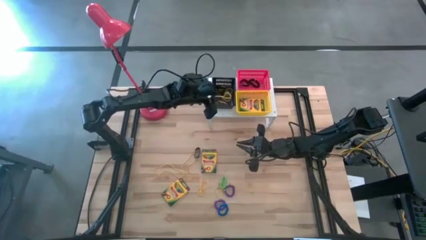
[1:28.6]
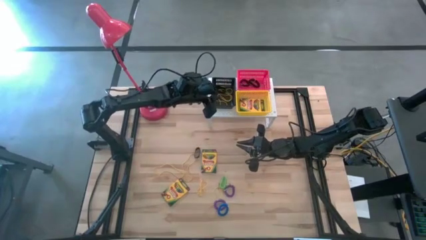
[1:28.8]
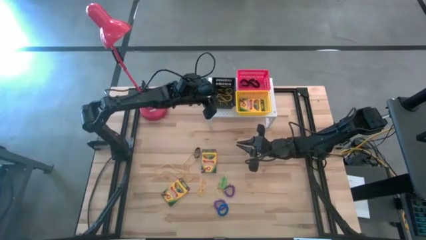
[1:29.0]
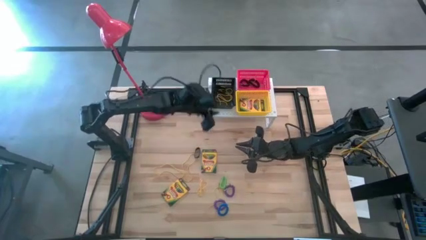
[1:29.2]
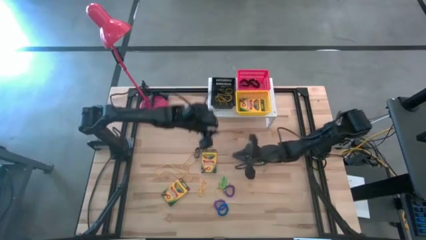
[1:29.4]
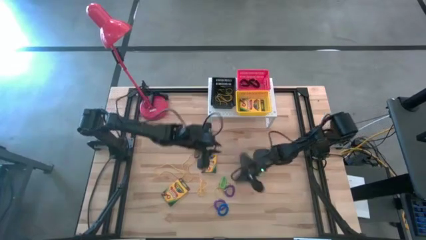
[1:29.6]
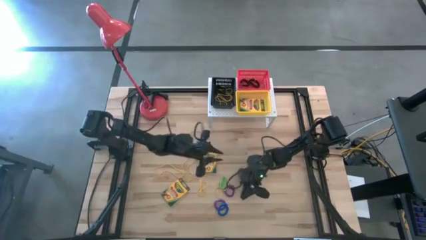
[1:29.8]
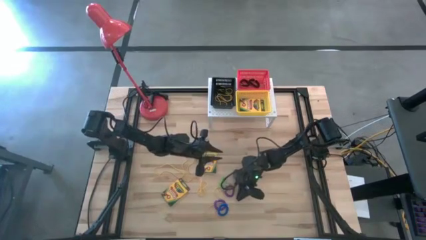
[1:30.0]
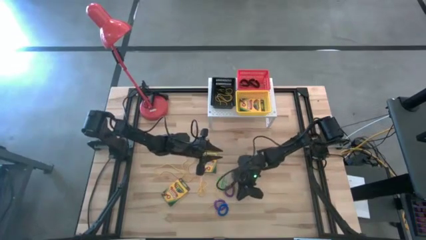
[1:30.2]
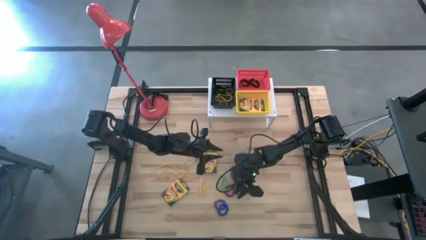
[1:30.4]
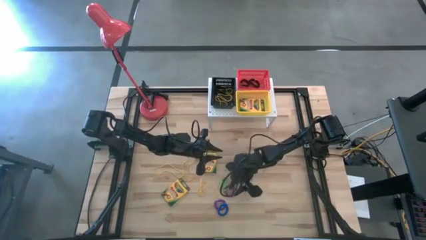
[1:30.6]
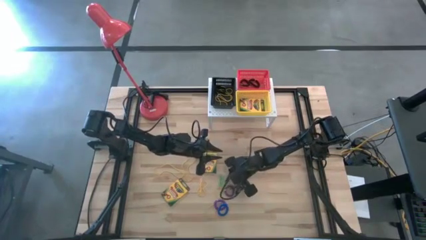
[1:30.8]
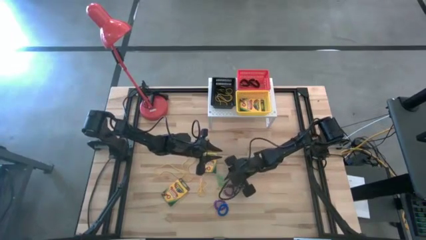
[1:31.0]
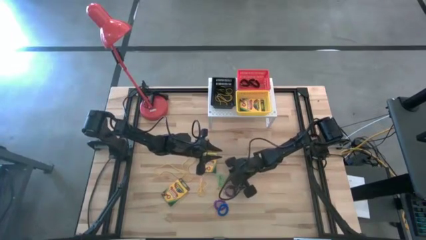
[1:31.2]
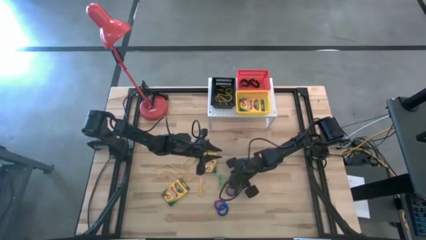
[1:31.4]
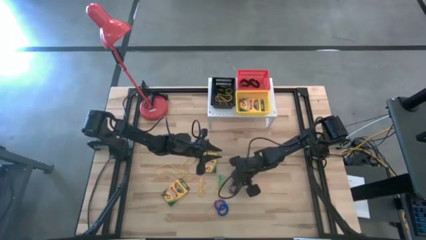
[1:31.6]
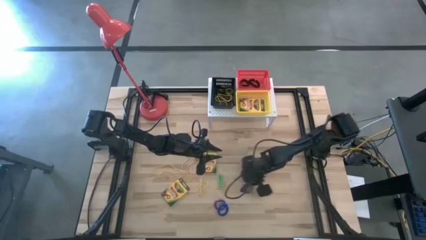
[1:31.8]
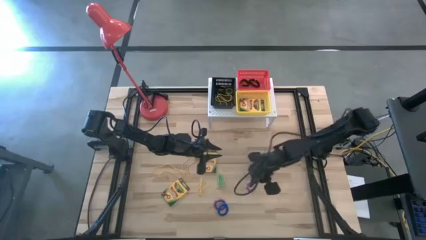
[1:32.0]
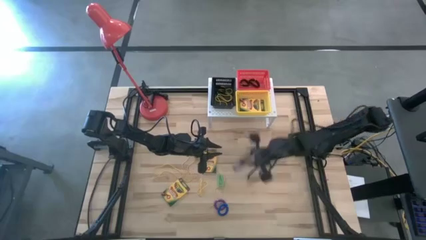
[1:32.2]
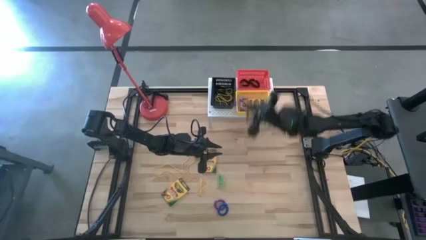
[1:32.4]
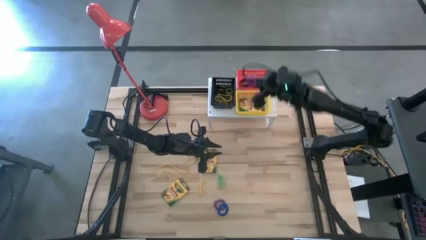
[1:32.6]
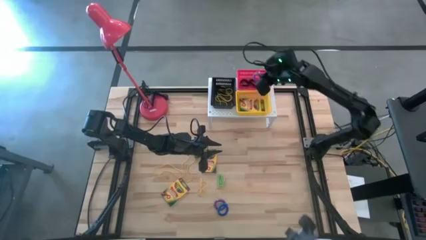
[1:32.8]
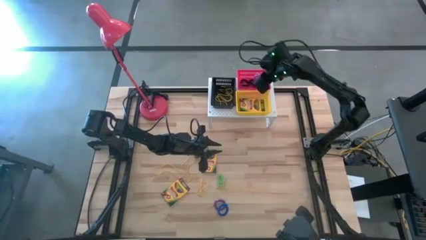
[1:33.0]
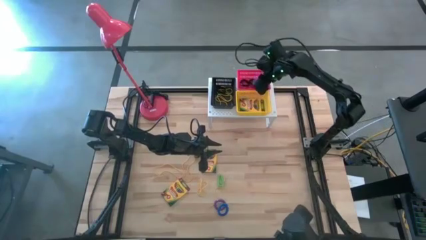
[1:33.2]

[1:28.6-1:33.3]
Task: Pick & Place Office Desk Supplies
Put the violet spring keychain into the red bin on the shelf

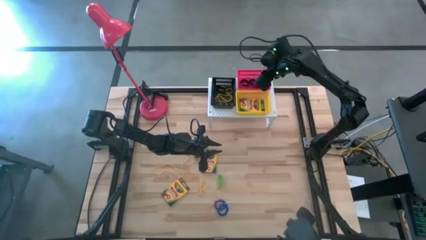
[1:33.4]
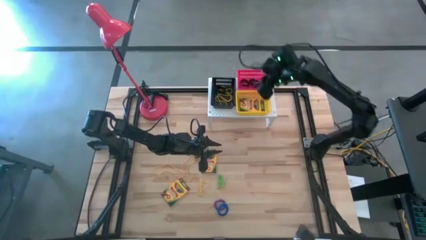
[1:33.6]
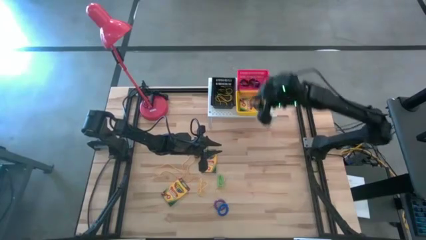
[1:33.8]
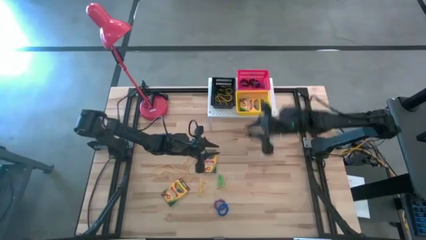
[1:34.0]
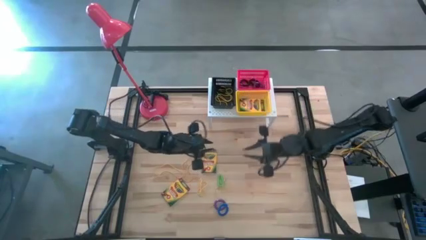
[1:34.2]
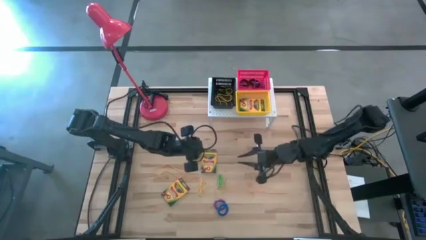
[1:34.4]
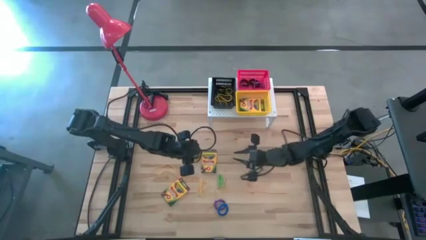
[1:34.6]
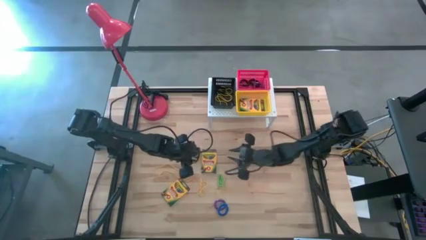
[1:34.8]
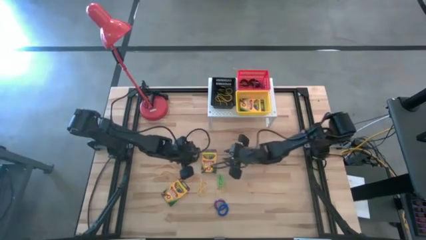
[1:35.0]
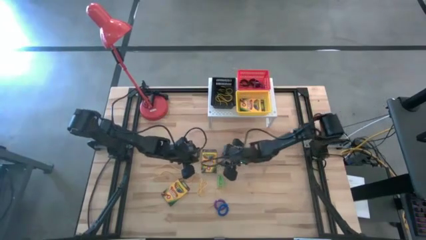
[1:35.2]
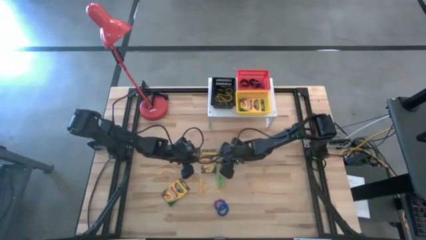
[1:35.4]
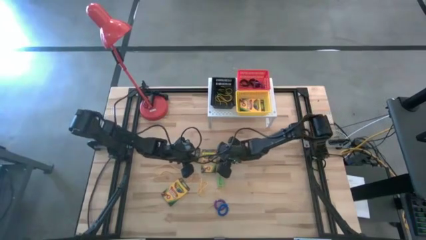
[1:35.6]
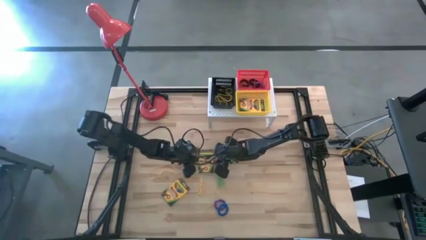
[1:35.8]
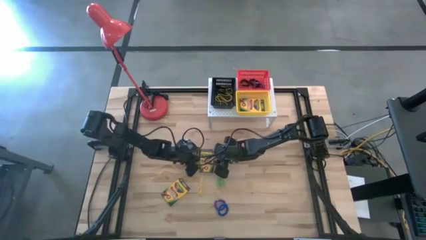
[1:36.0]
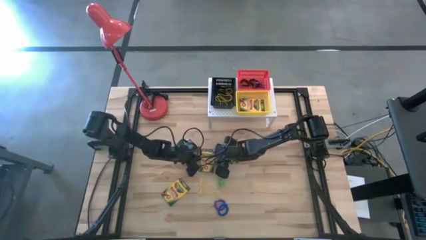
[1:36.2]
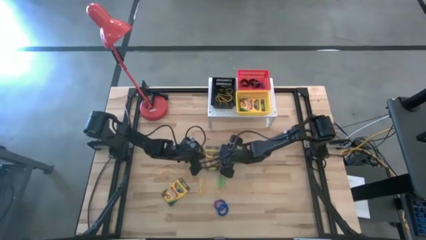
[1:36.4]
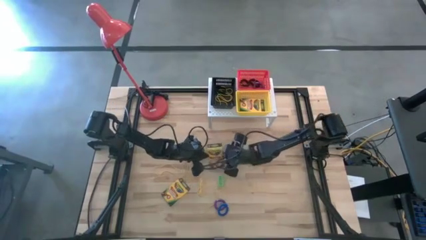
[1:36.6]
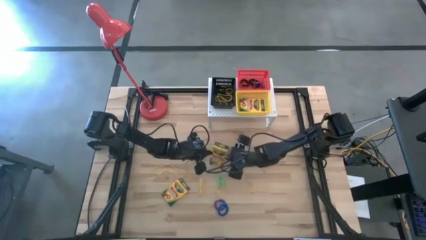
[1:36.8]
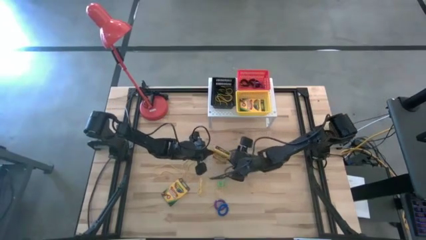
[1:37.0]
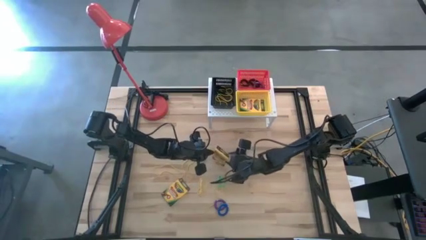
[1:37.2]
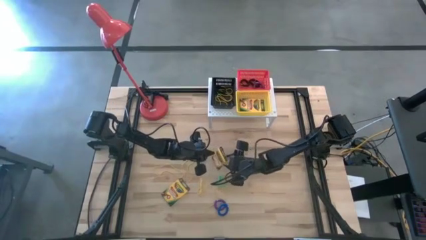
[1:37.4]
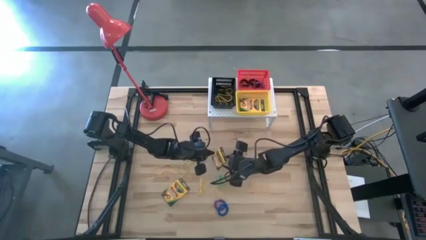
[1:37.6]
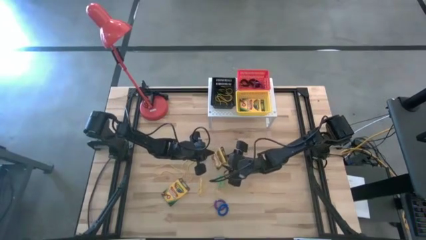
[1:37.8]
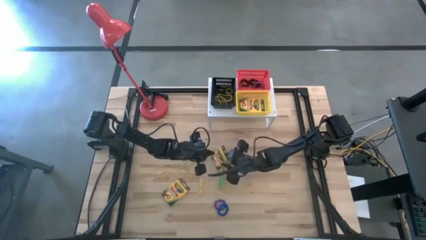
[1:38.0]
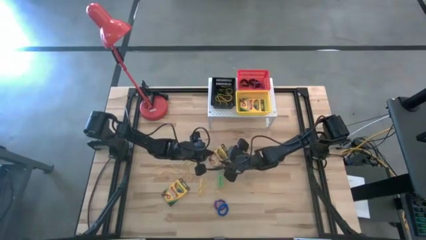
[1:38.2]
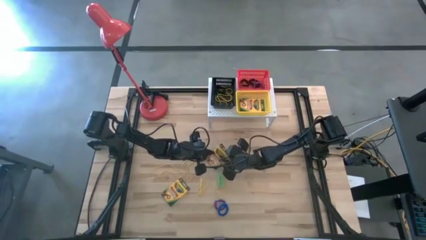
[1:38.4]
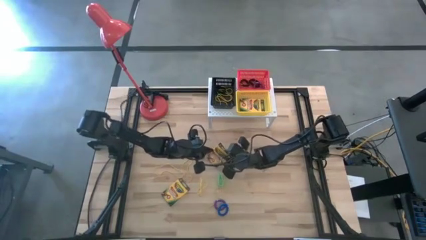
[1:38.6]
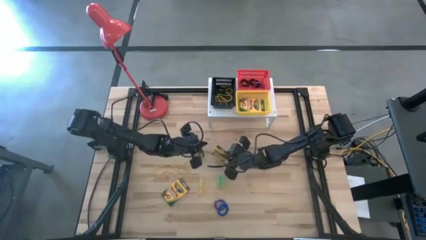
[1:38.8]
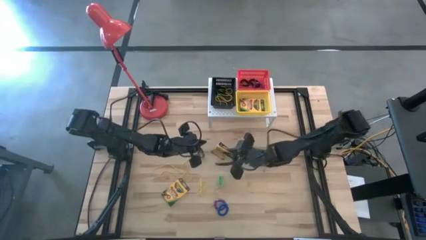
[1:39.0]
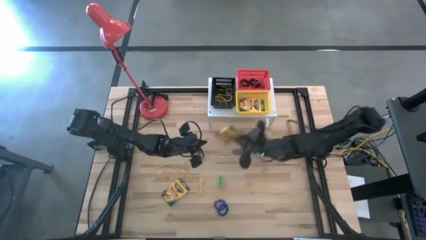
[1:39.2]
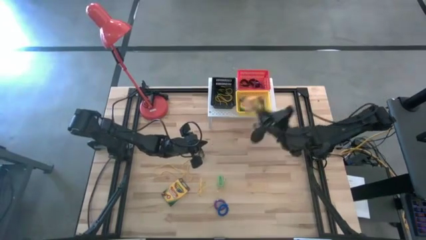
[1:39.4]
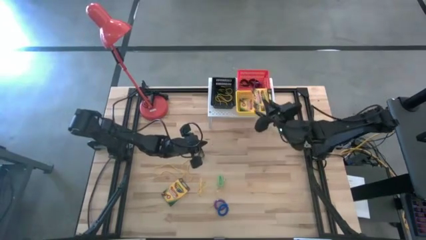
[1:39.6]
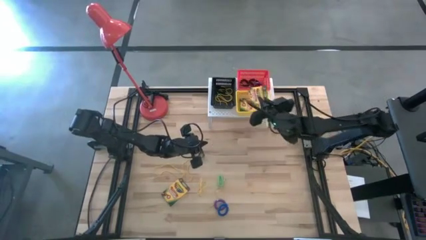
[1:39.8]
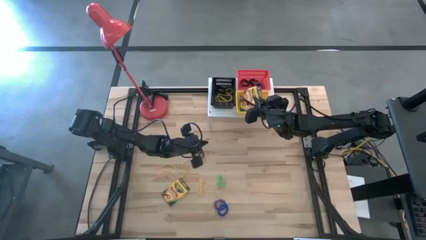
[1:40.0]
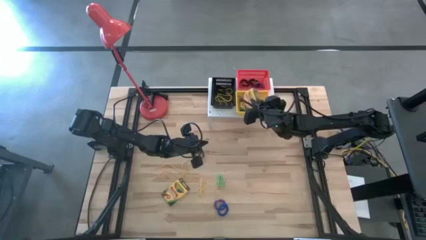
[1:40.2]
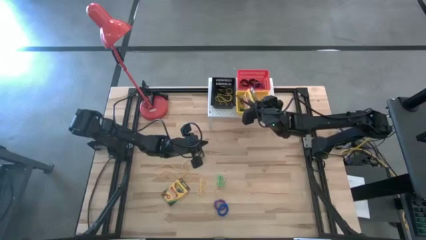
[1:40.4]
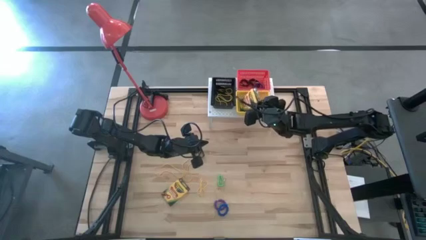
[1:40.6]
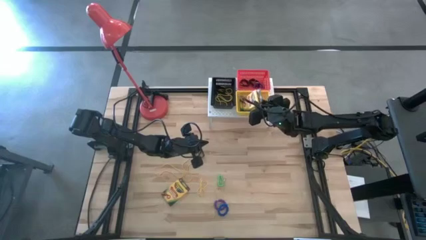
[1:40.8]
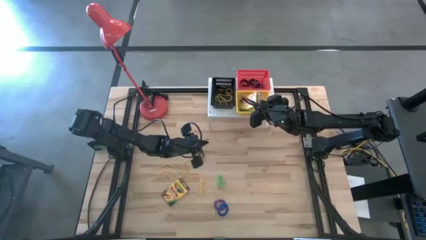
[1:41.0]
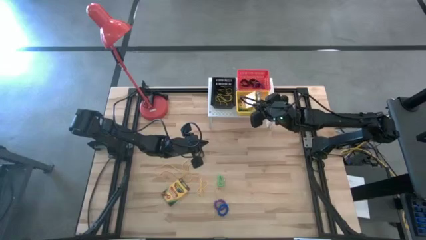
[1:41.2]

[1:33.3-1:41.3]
Put the yellow crayon box into the yellow bin on the shelf

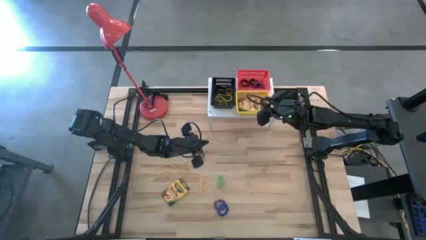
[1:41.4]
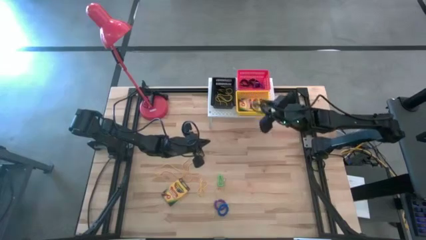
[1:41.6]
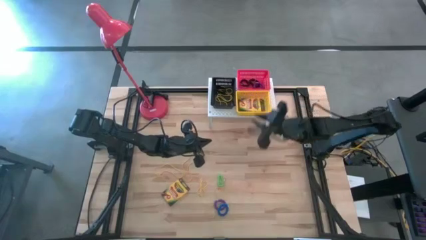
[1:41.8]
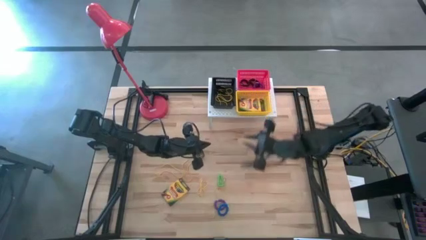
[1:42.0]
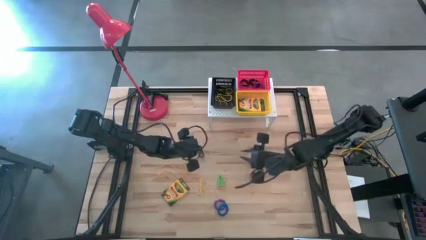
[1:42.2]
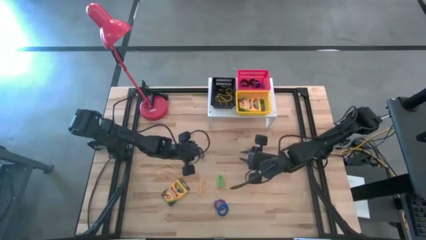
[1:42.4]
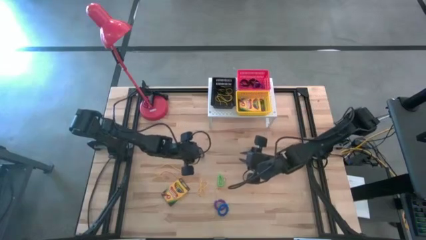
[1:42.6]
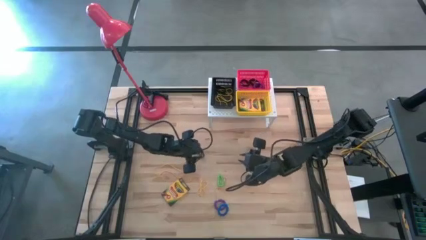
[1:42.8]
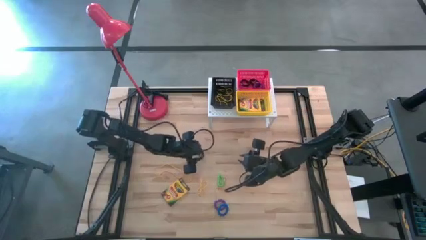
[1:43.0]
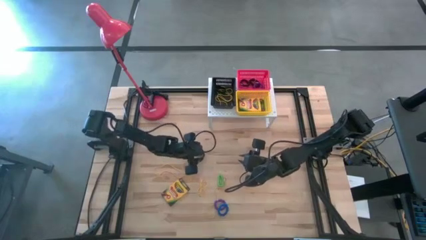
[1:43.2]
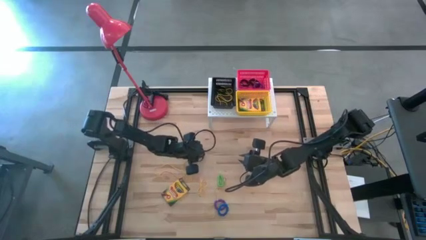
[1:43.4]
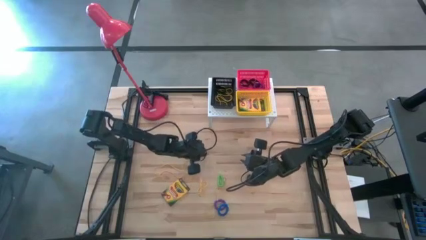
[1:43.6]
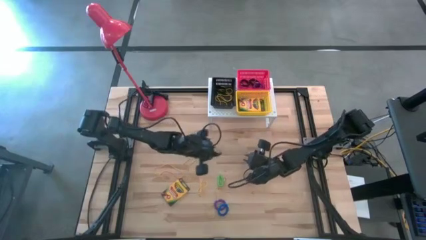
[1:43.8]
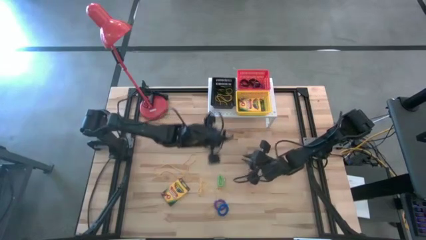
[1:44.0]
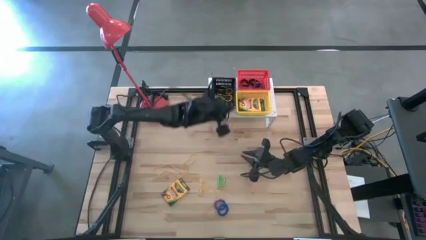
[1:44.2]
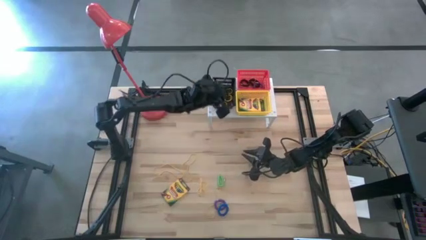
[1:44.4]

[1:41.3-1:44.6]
Put the black rubber band into the black bin on the shelf

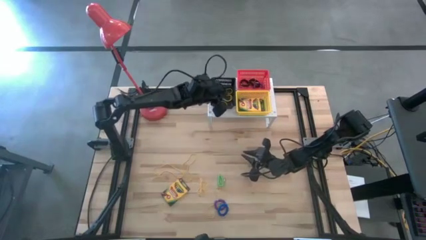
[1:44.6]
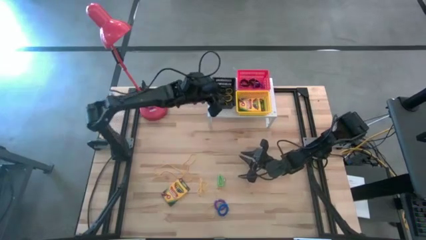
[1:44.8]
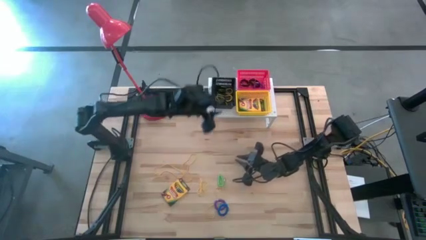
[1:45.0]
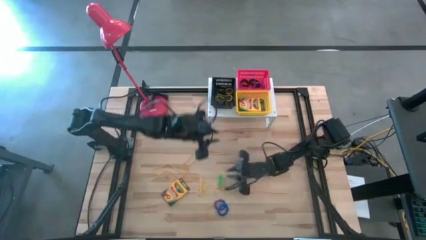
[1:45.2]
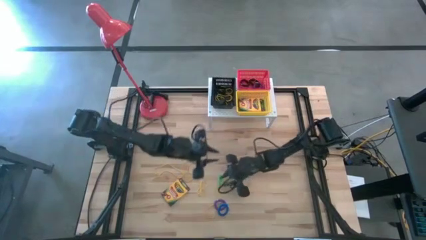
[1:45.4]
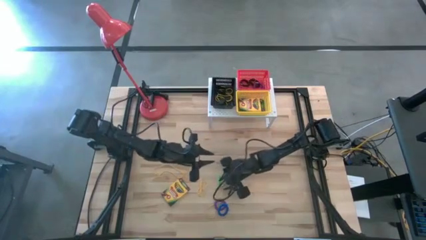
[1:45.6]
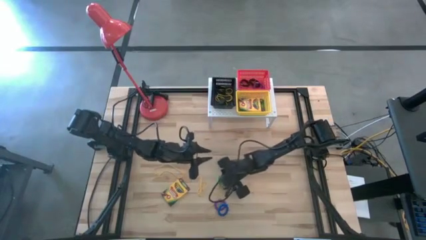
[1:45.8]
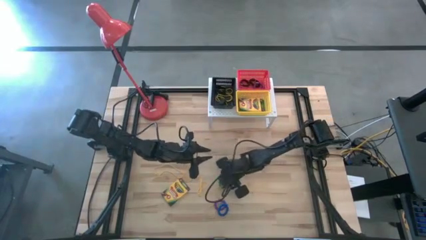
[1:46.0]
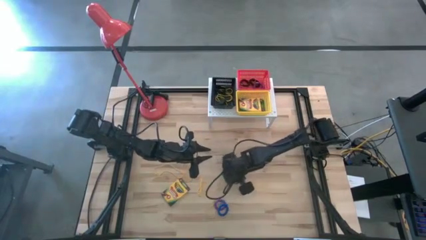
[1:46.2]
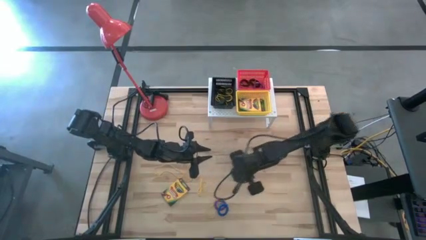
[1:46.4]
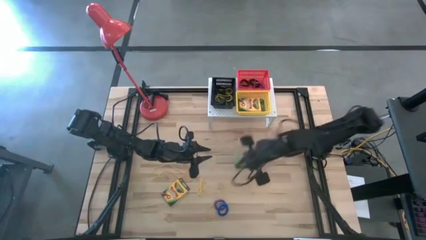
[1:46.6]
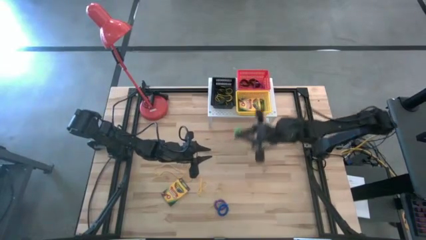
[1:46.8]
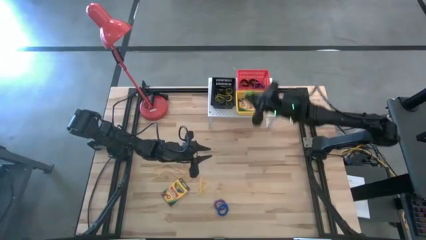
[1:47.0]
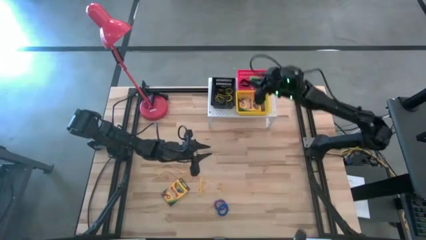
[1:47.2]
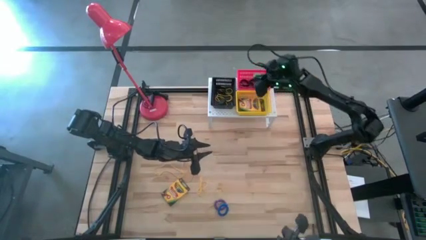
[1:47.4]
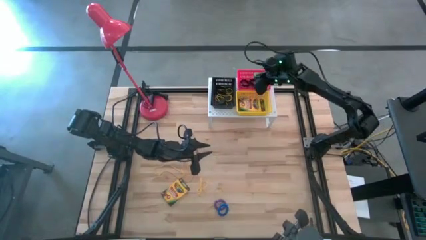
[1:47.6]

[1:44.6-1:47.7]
Put the green spring keychain into the red bin on the shelf
